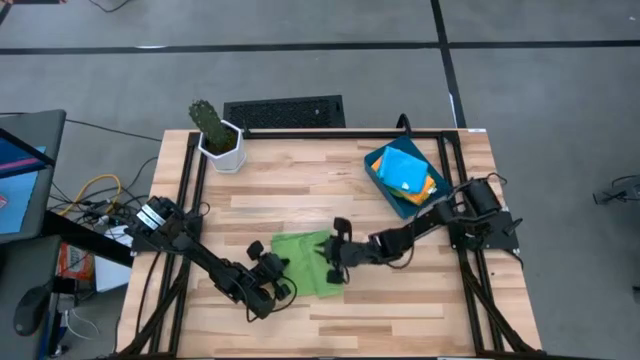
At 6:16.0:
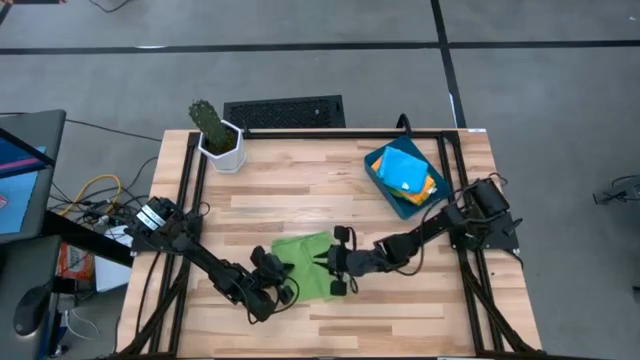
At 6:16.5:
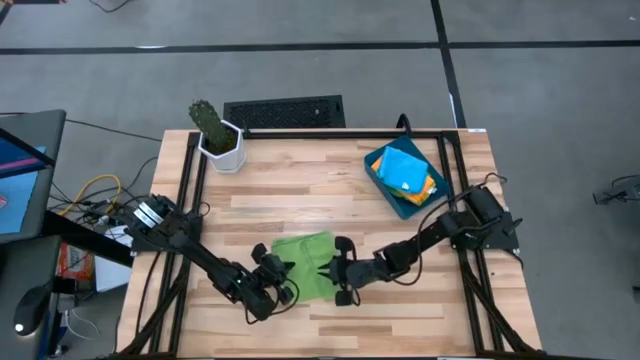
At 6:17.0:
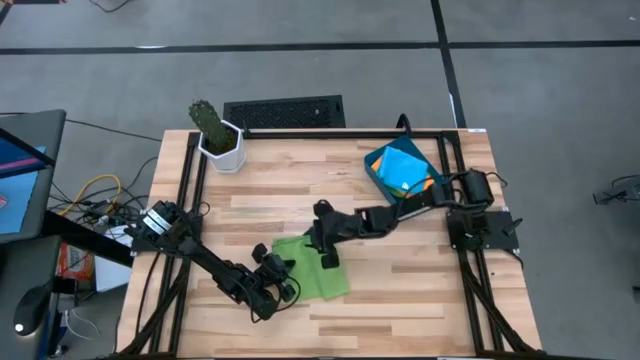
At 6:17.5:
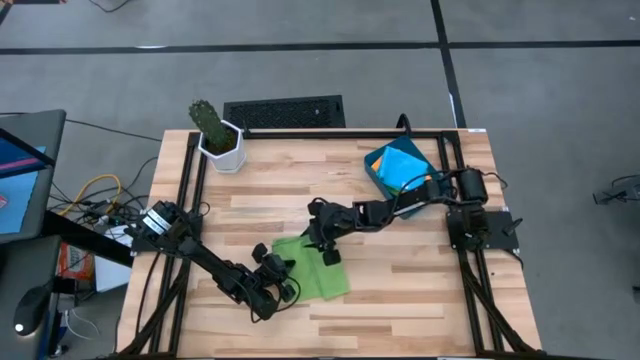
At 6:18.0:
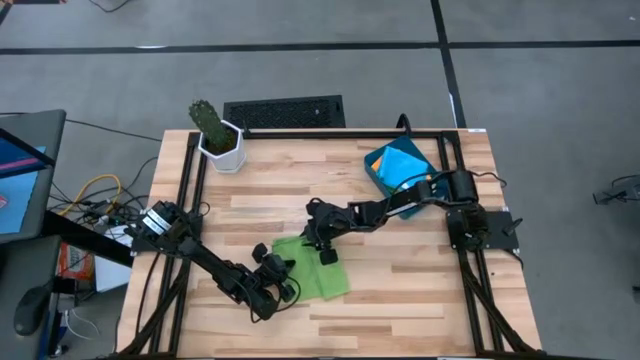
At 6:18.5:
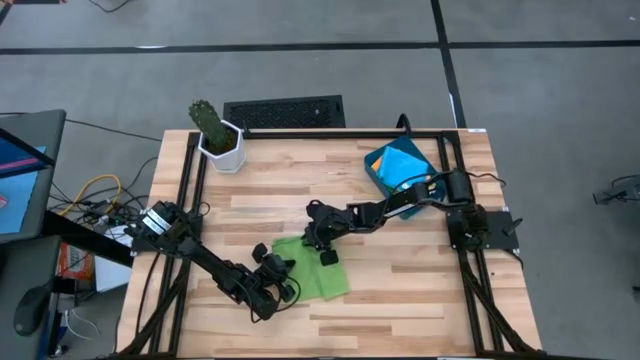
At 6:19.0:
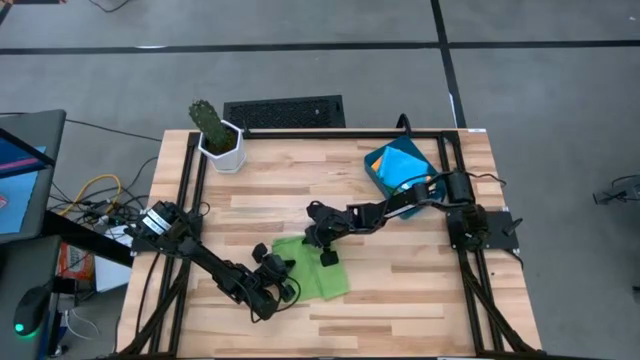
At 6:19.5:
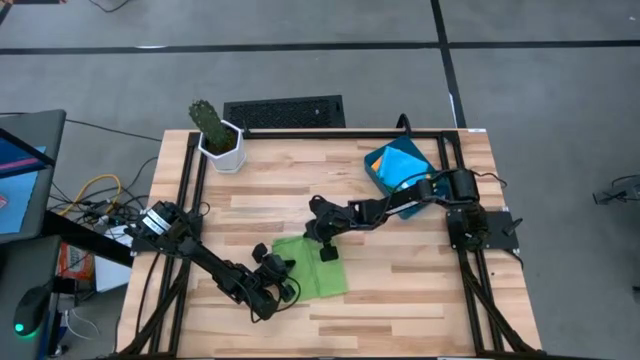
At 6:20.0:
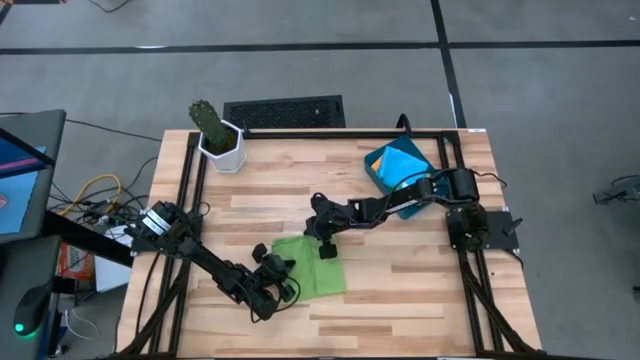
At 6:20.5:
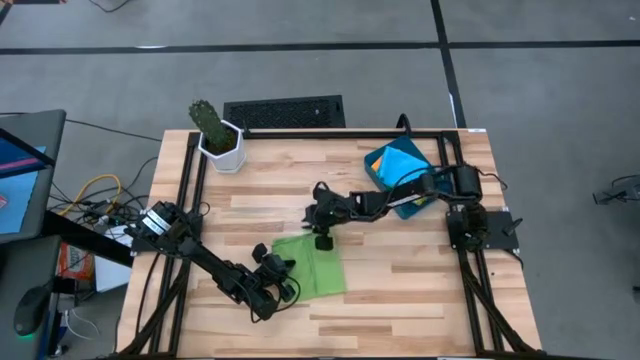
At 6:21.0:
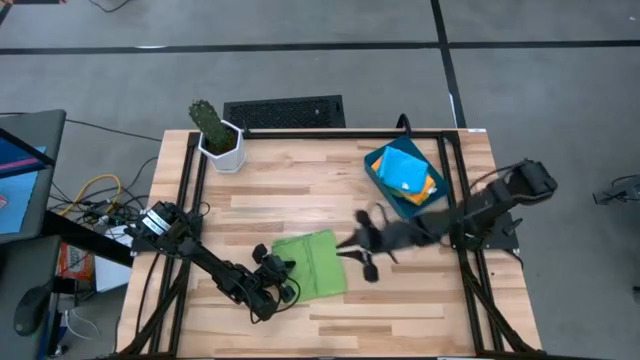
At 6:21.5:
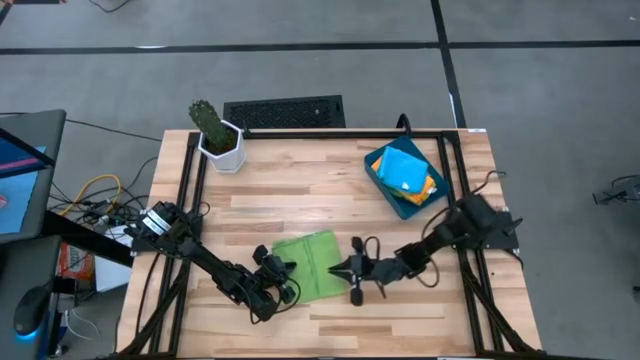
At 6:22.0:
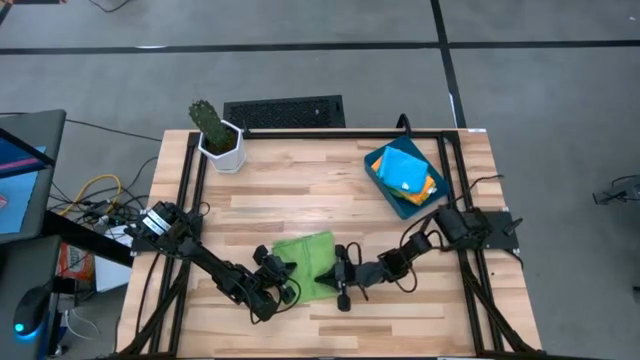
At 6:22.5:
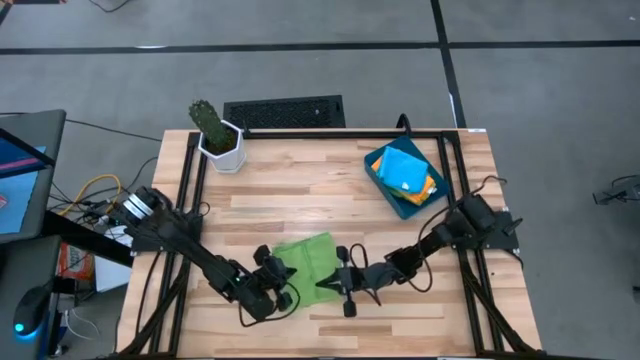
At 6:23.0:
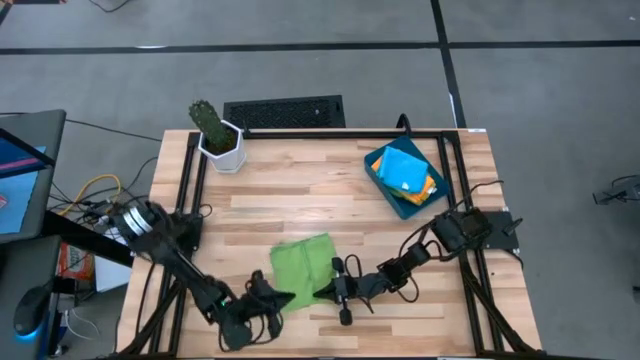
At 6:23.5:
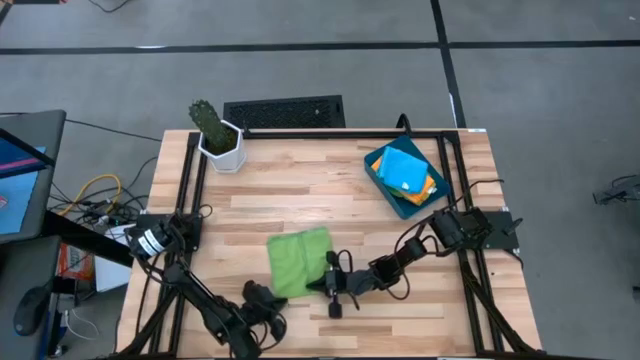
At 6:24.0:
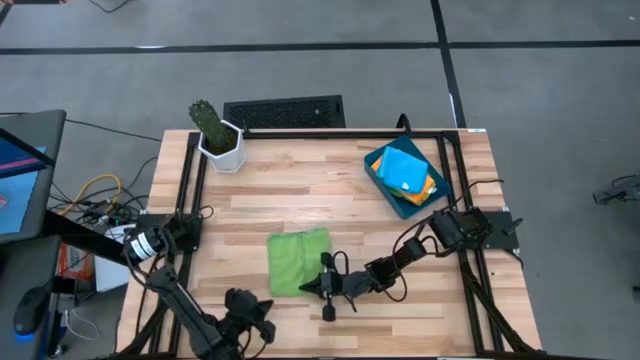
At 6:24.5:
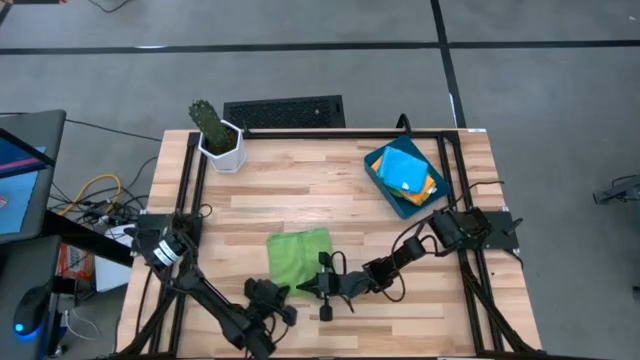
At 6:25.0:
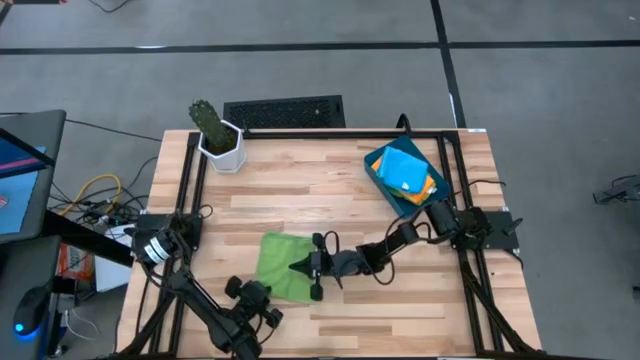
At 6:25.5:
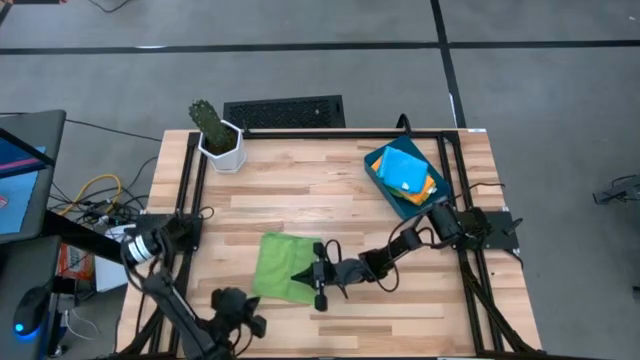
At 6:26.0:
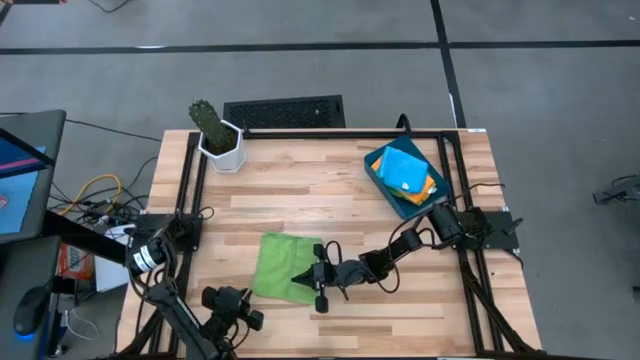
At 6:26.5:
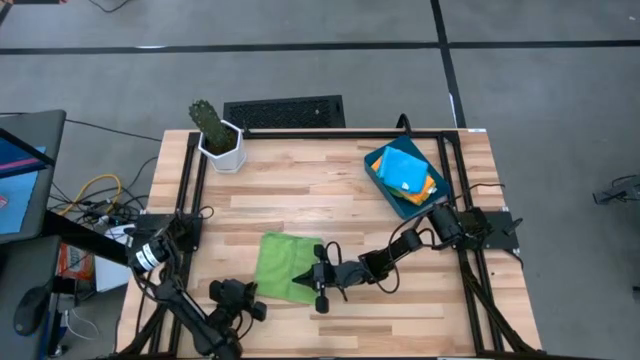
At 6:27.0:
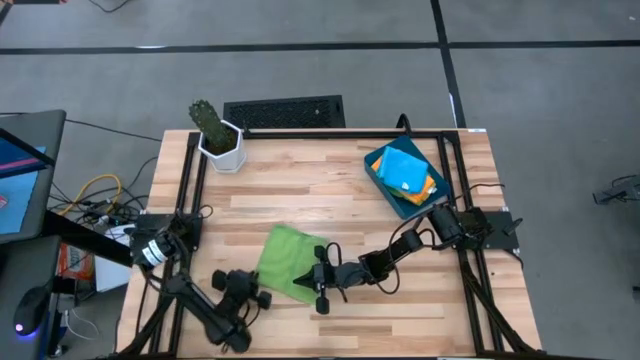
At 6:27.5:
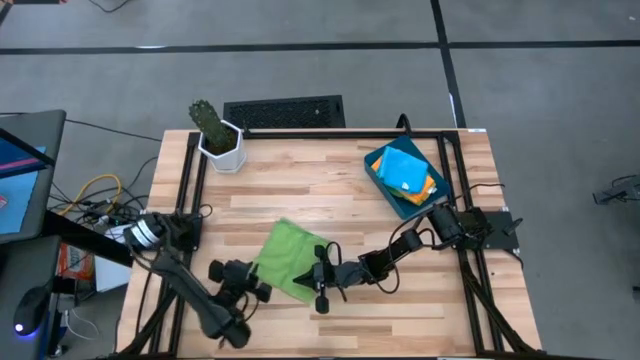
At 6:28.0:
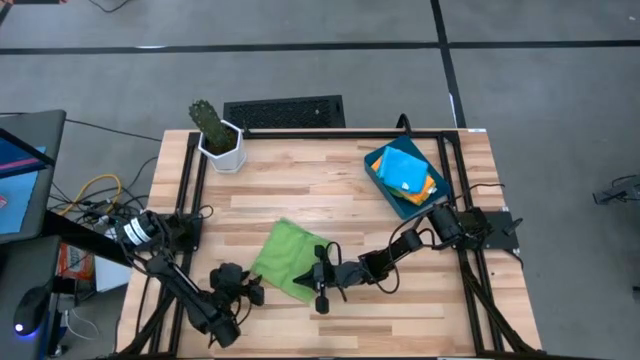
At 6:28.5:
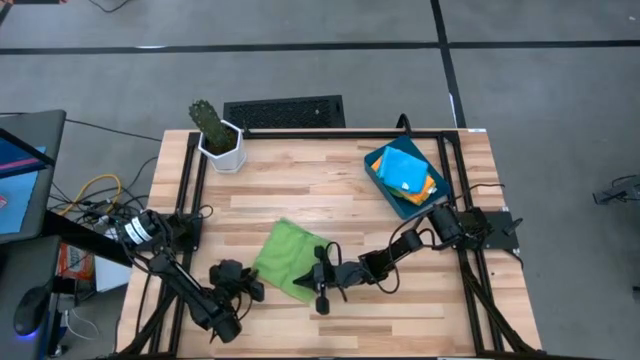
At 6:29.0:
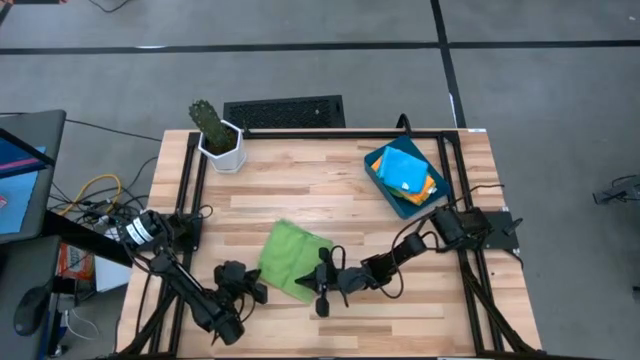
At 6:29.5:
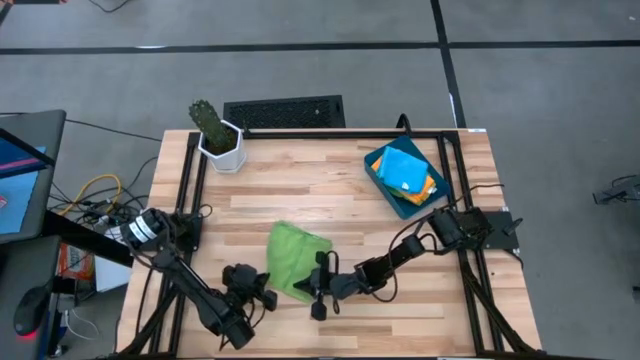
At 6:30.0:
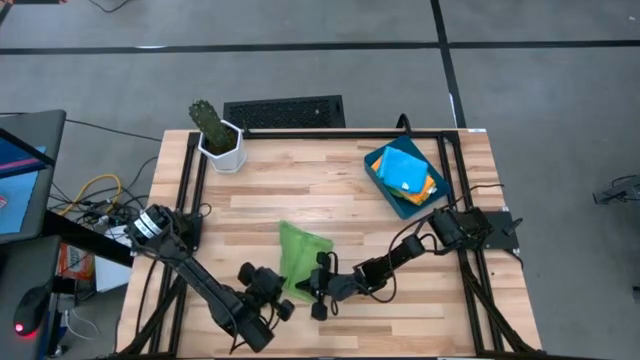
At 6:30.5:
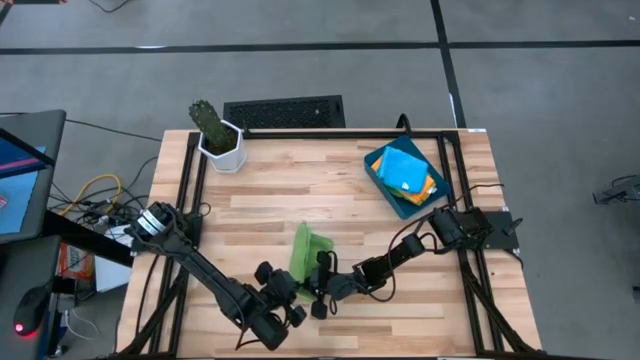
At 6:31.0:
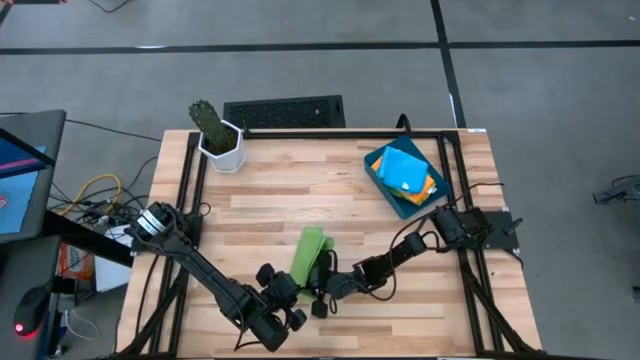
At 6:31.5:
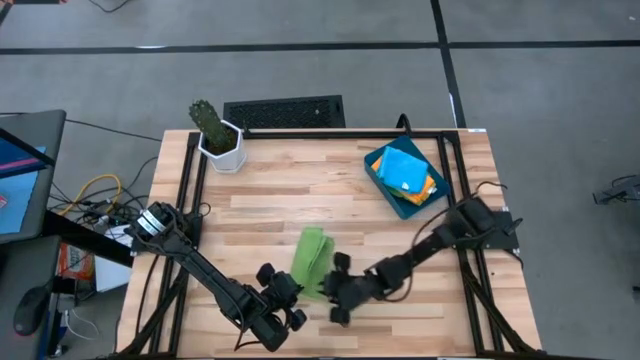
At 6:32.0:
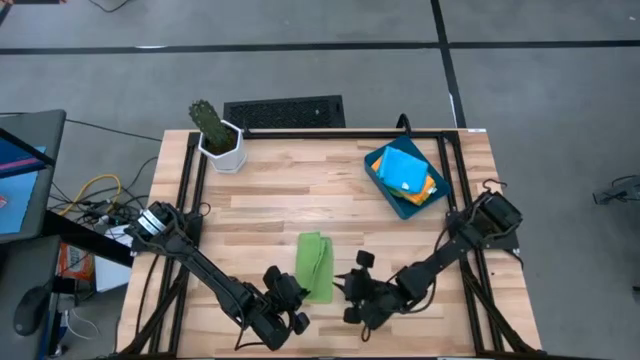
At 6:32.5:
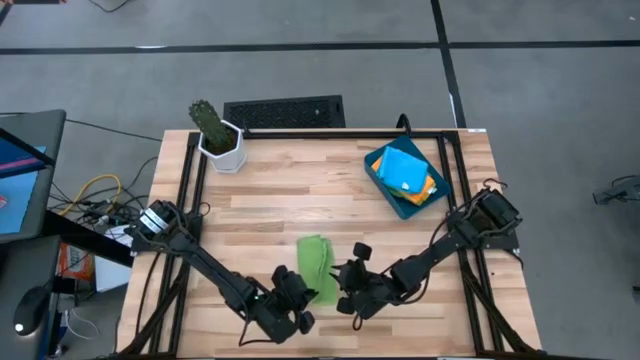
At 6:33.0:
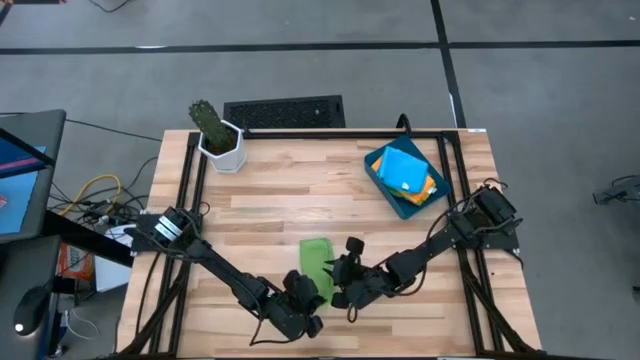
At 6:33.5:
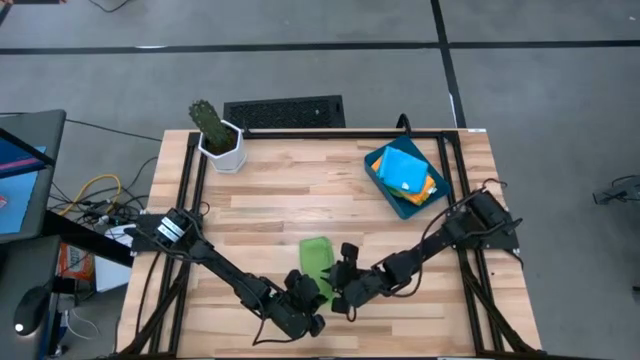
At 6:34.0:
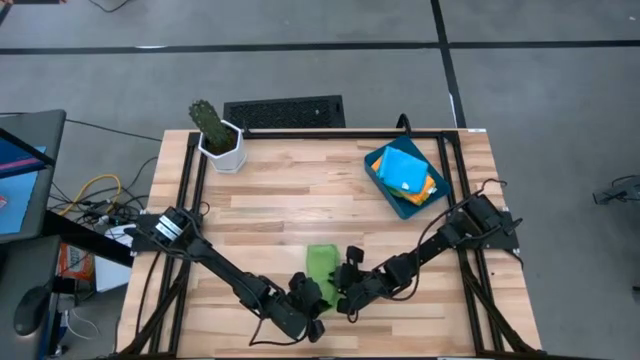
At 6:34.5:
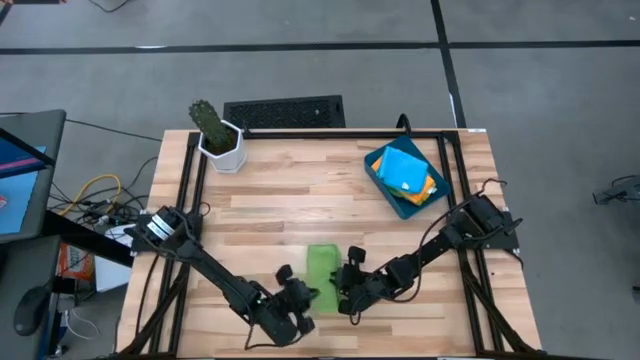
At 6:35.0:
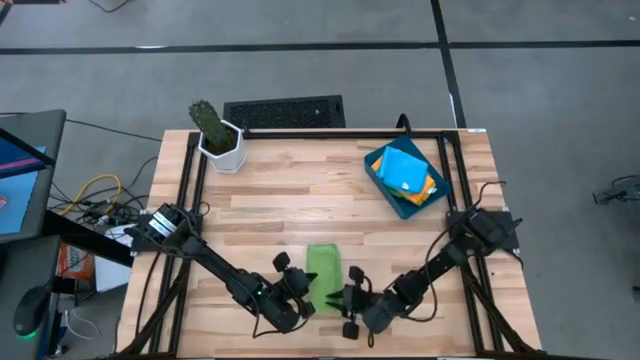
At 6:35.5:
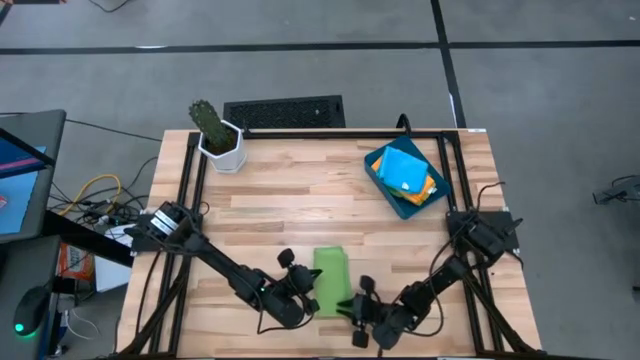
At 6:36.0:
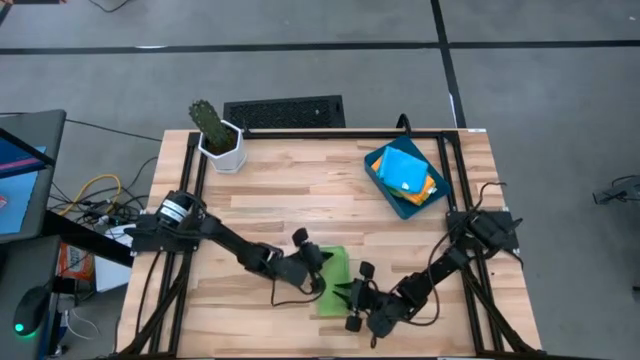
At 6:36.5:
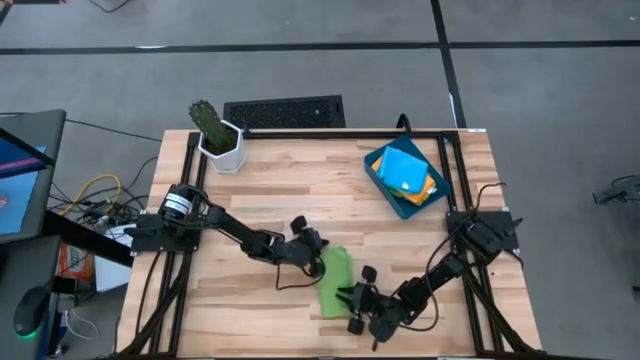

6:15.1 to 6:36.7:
Task: Fold microfiber towels
Fold the green microfiber cloth
